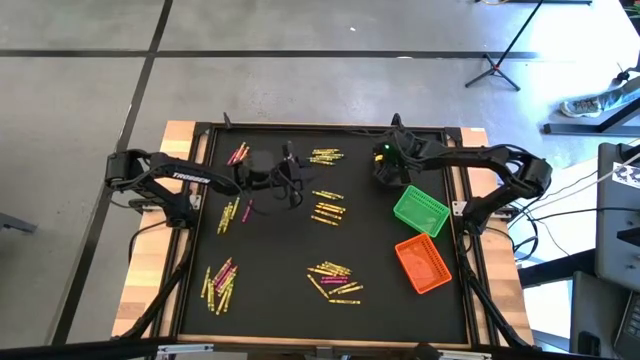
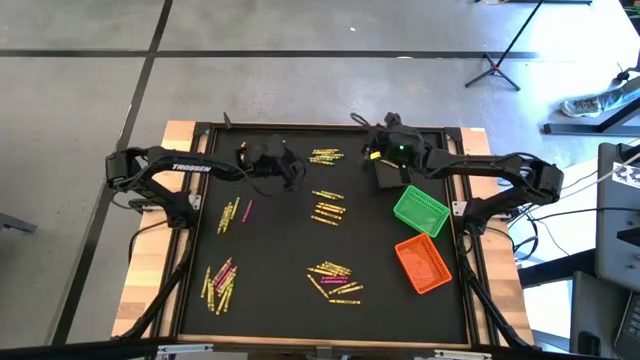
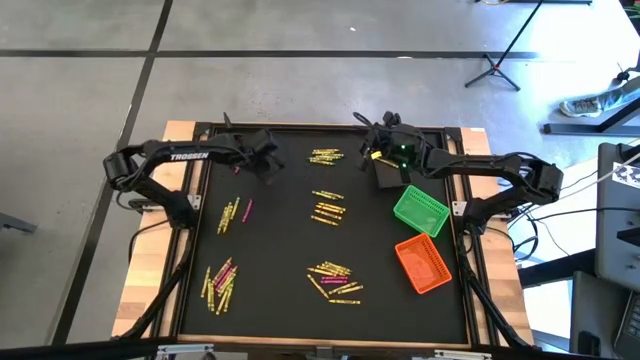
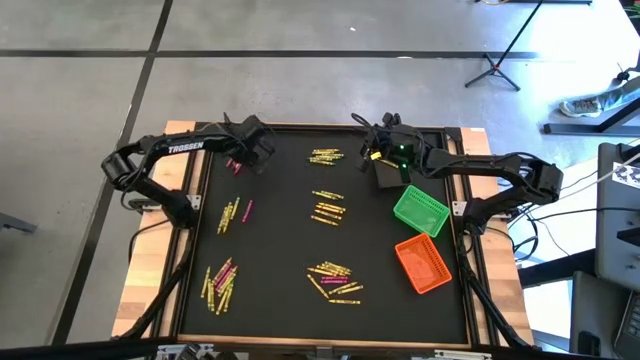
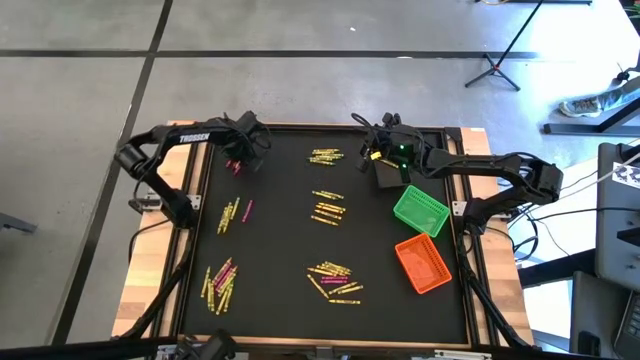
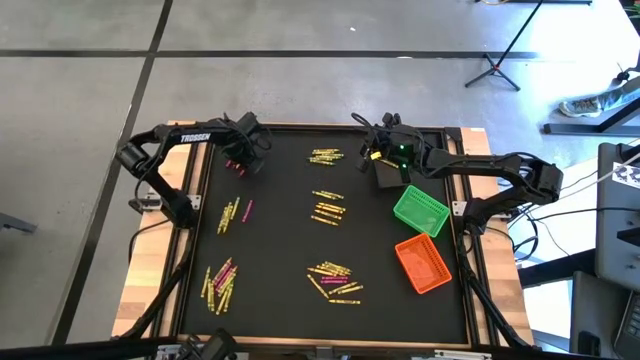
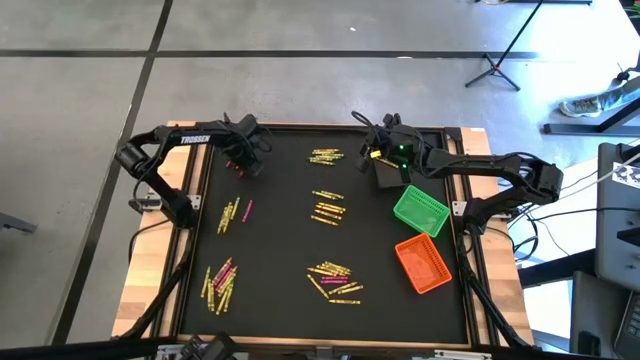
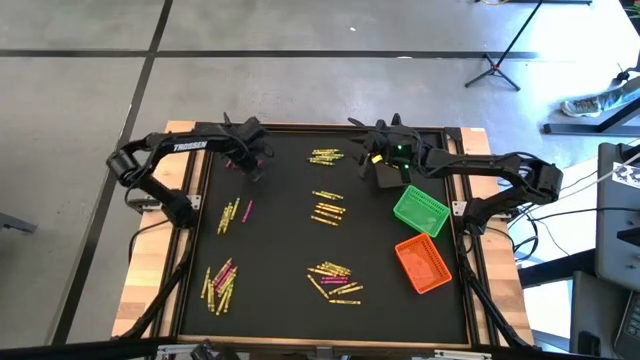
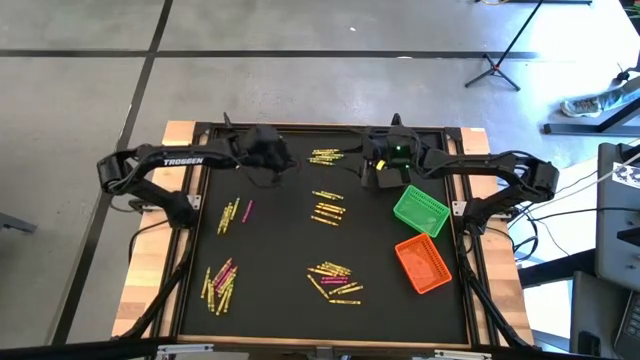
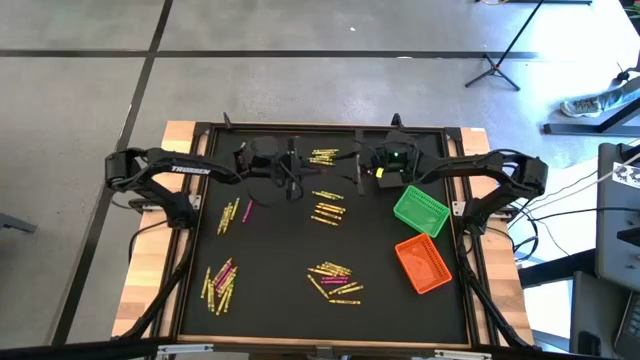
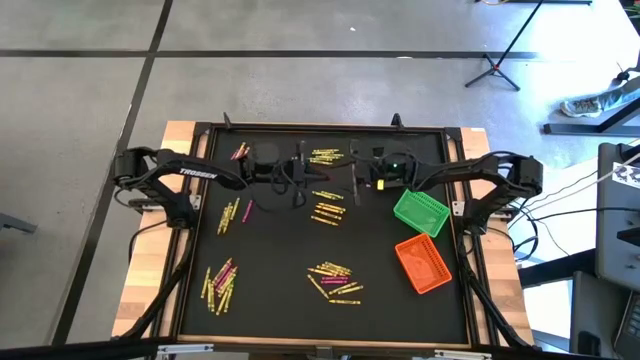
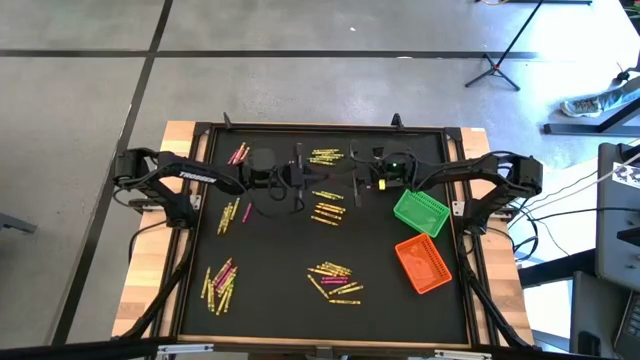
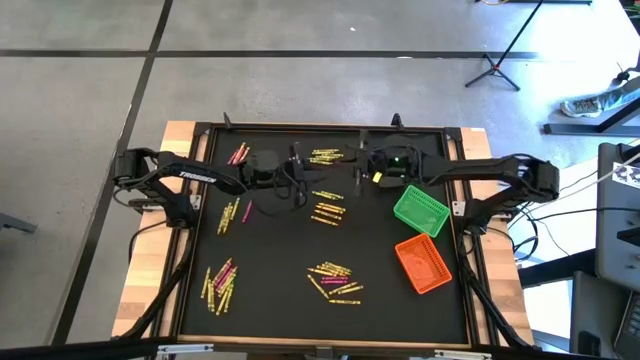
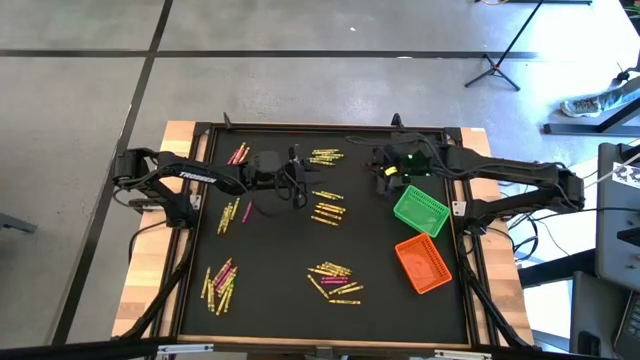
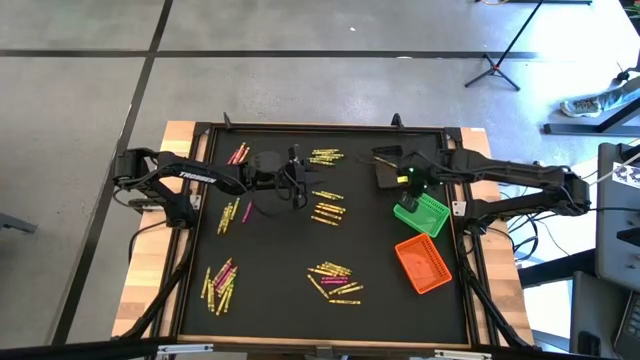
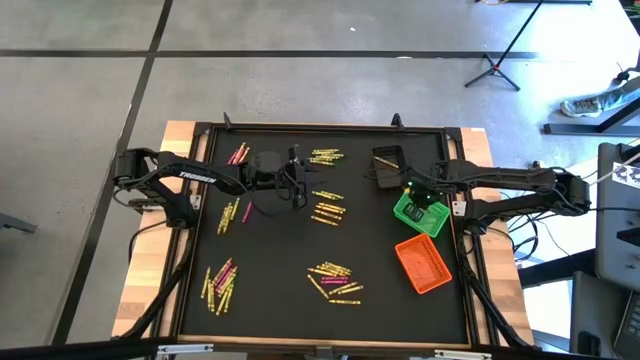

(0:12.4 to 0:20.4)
Task: Sort crayons
Put the red crayon into the green basket

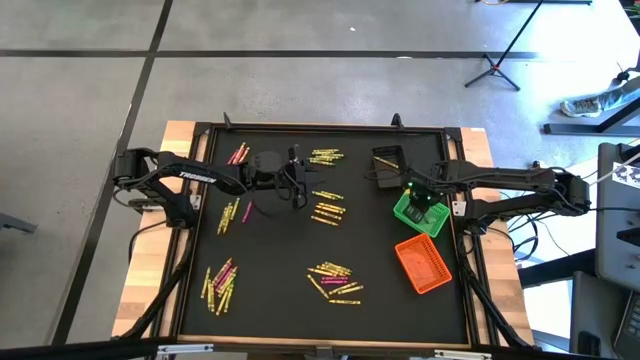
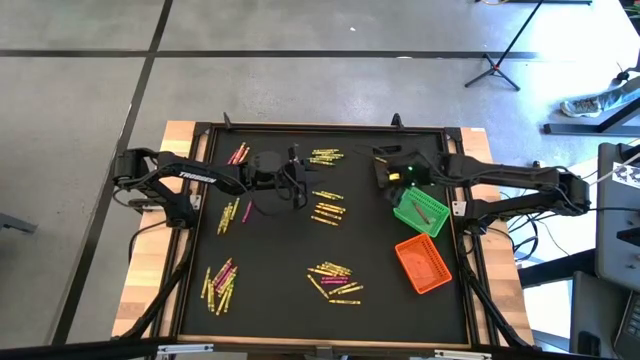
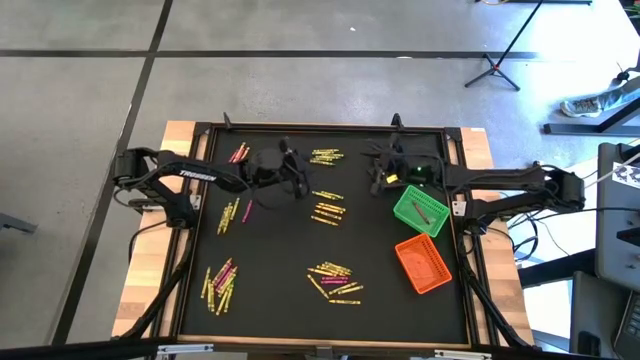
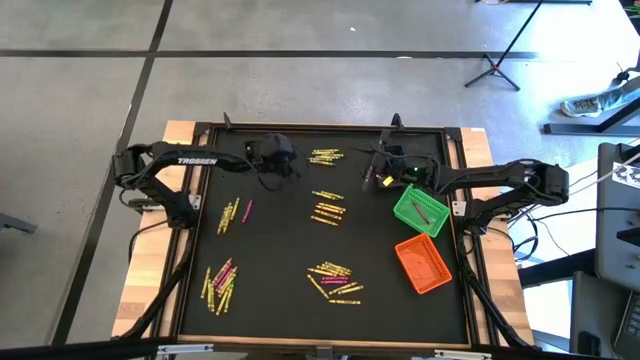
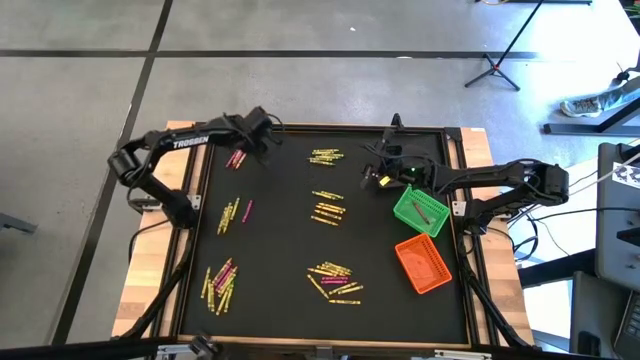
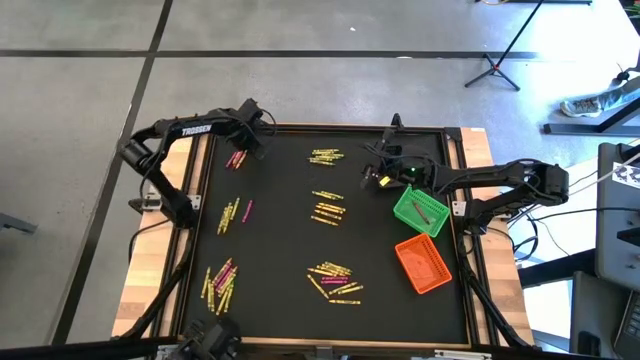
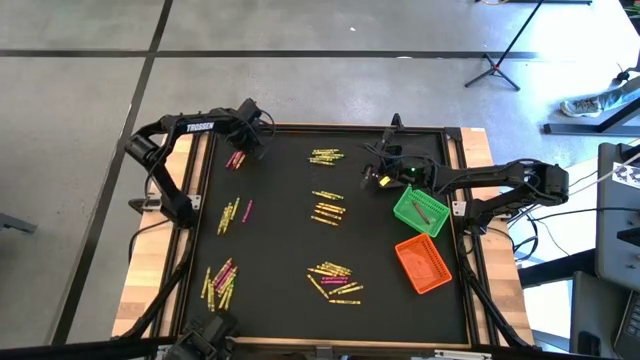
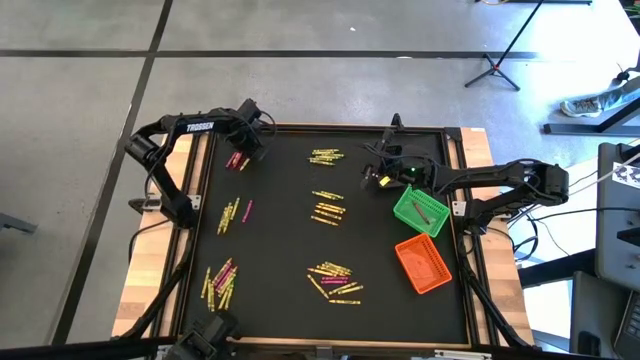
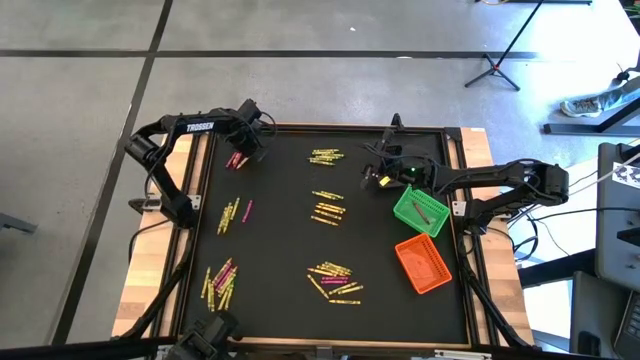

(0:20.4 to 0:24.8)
Put the yellow crayon into the black basket

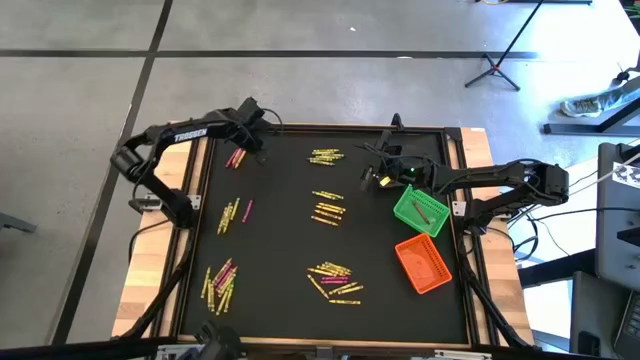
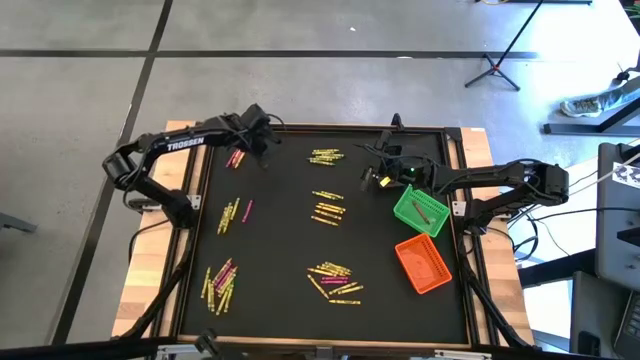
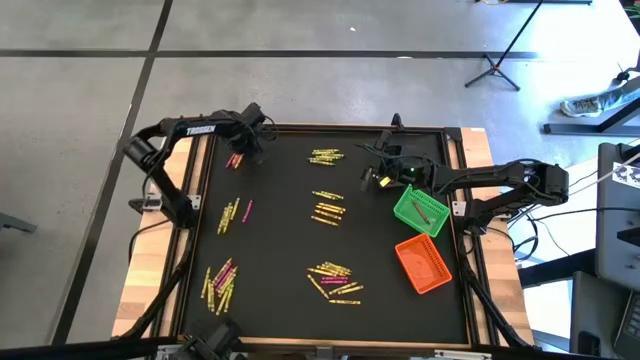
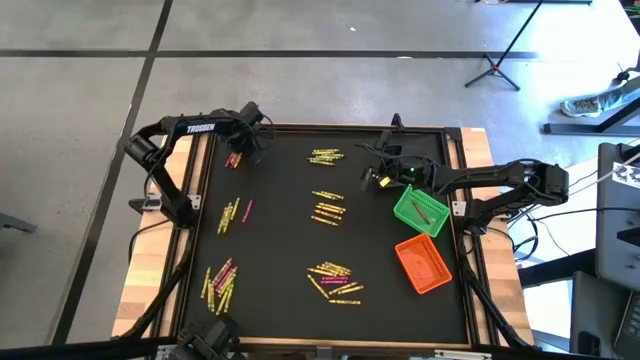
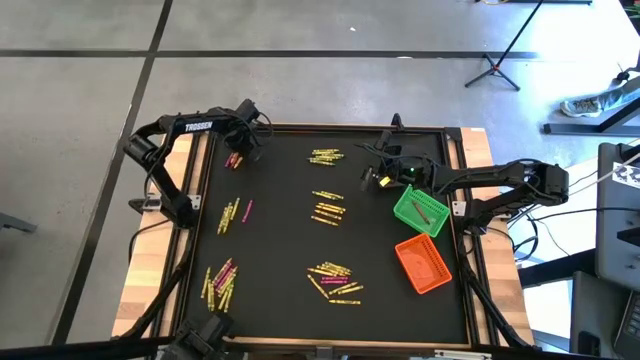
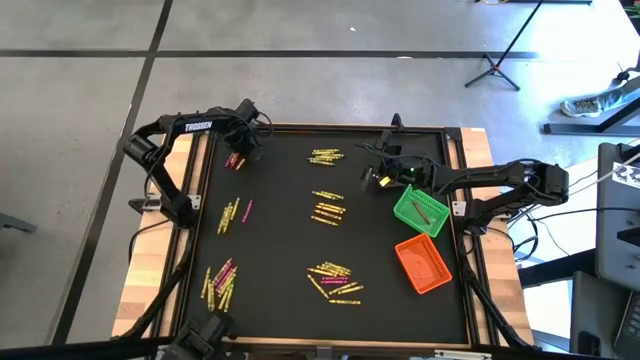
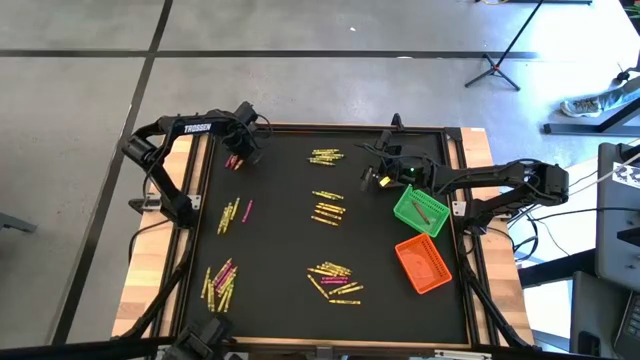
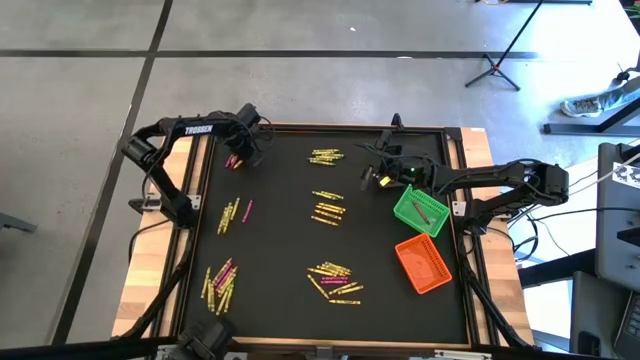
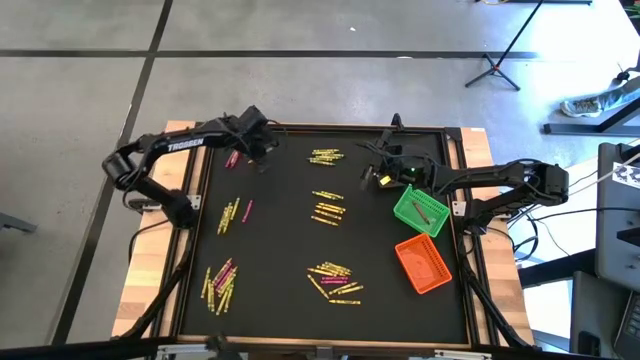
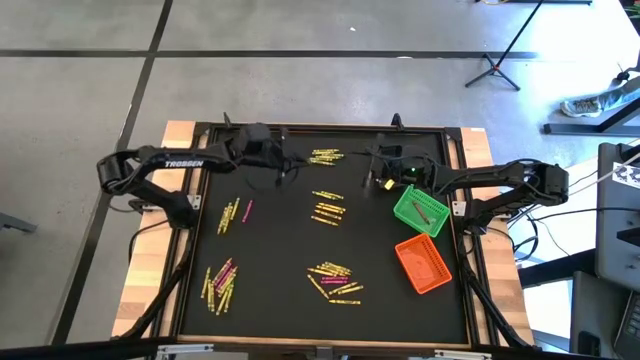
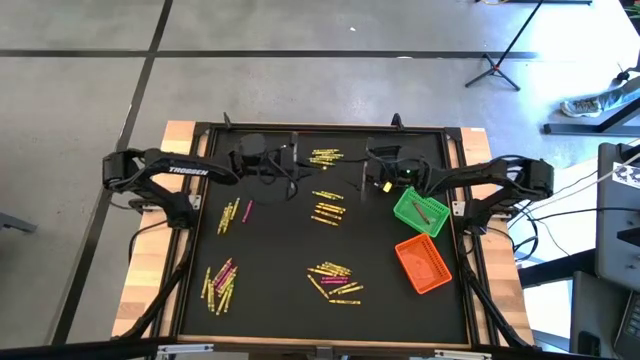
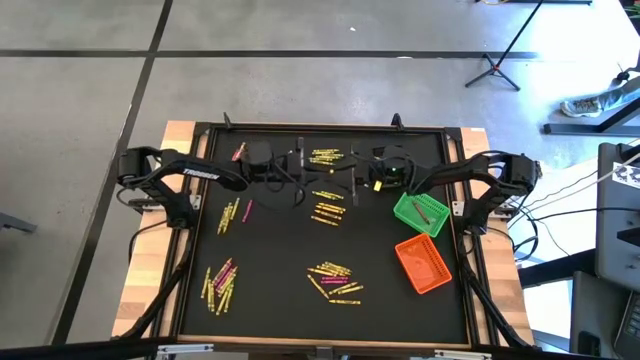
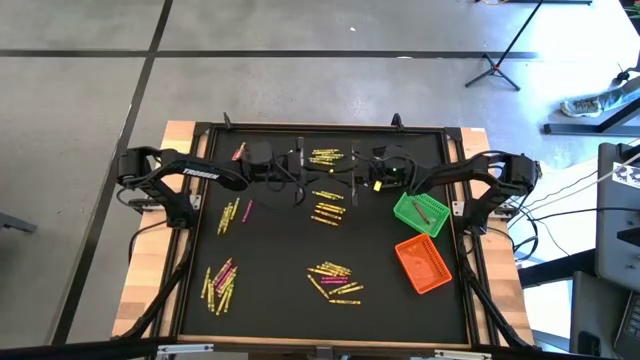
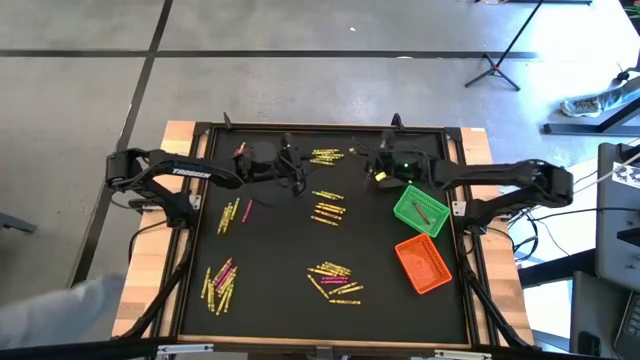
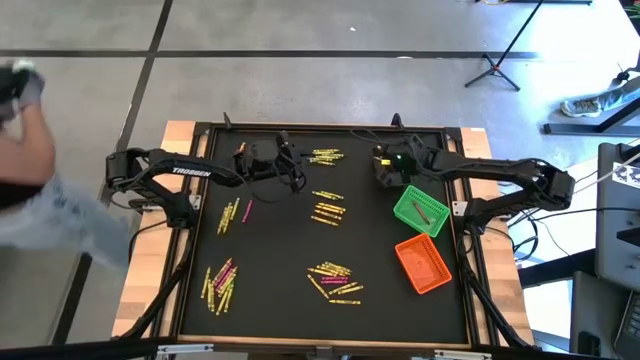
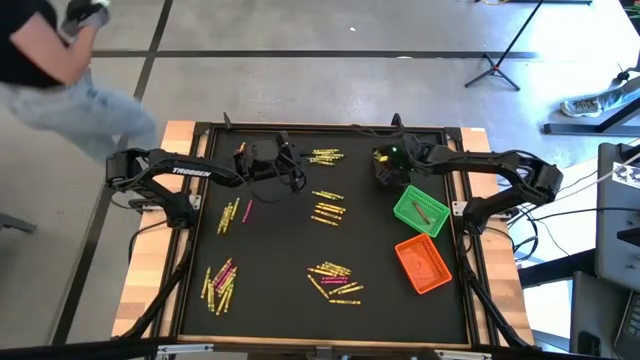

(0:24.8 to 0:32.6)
Put the yellow crayon into the black basket
